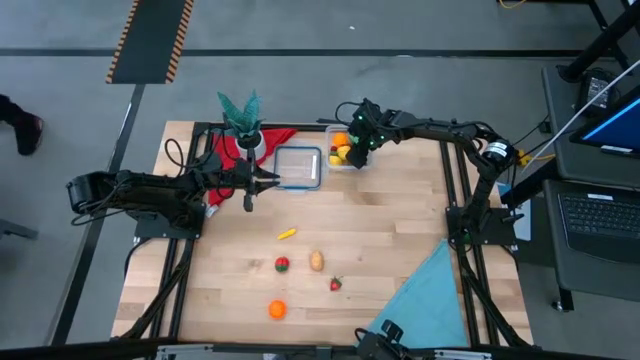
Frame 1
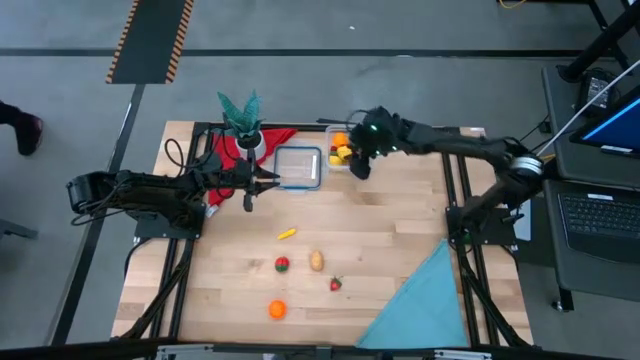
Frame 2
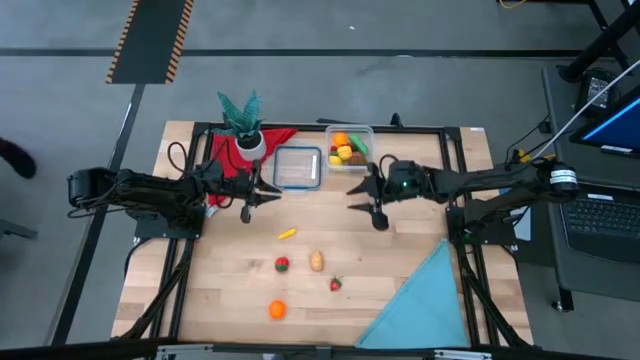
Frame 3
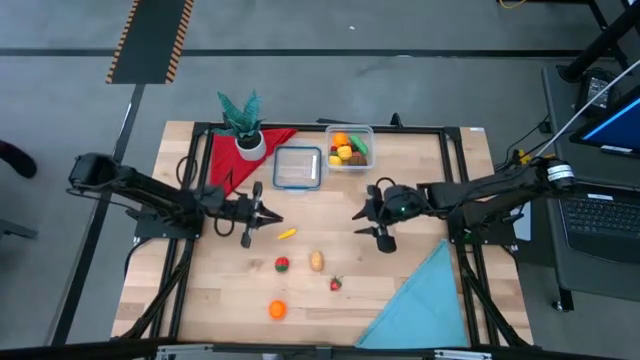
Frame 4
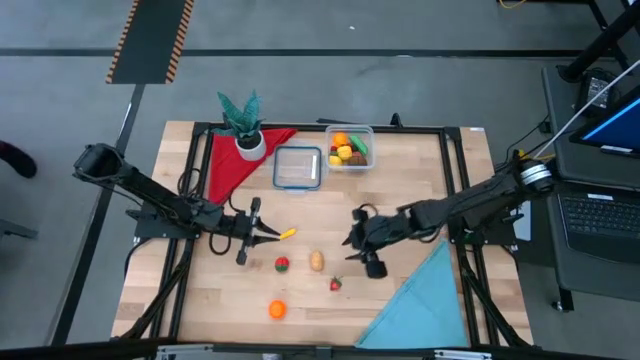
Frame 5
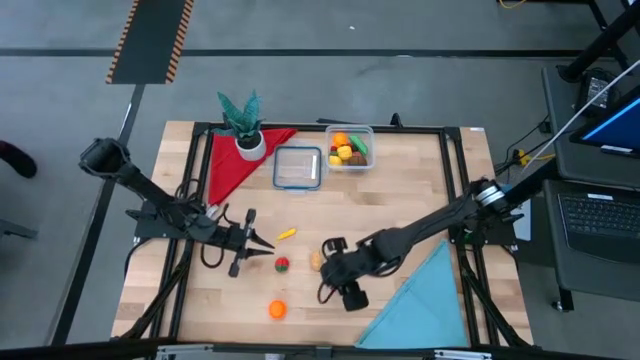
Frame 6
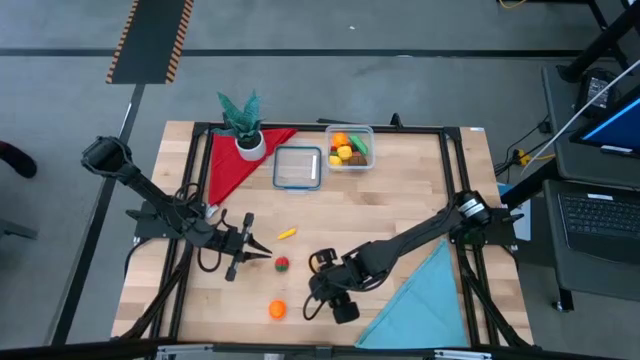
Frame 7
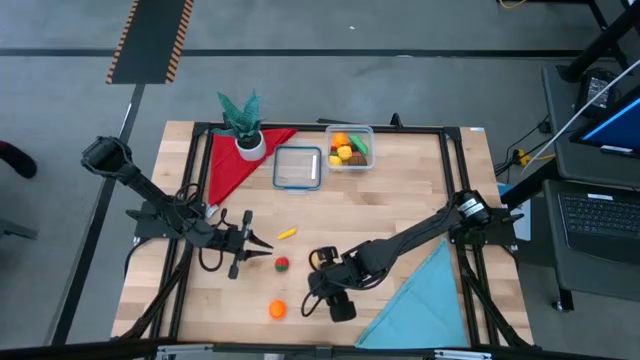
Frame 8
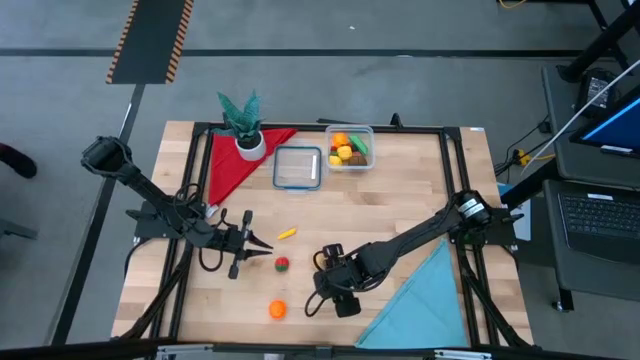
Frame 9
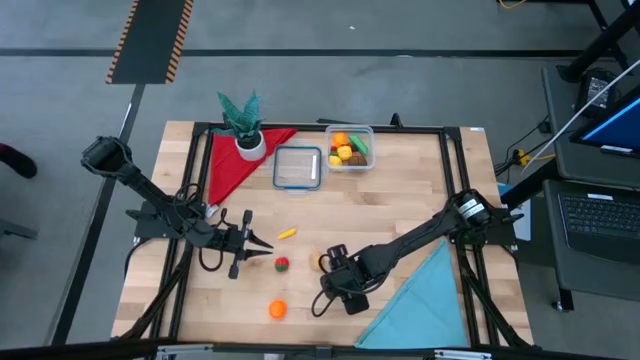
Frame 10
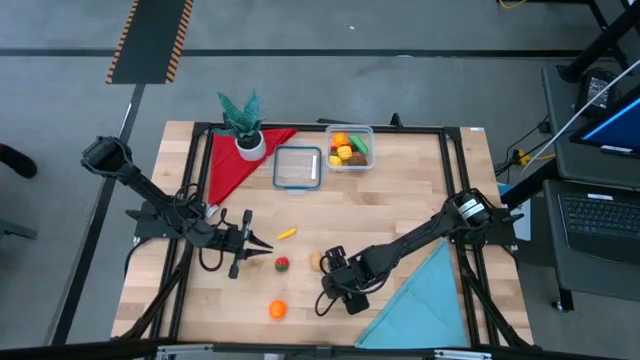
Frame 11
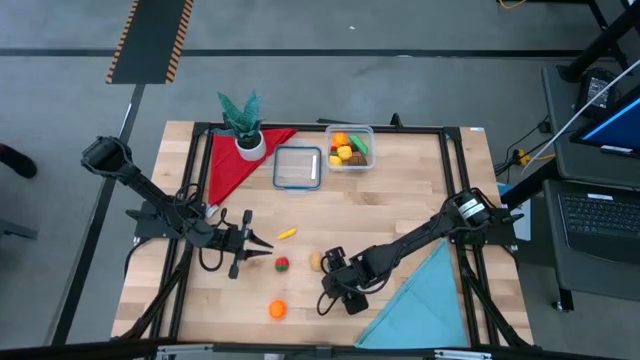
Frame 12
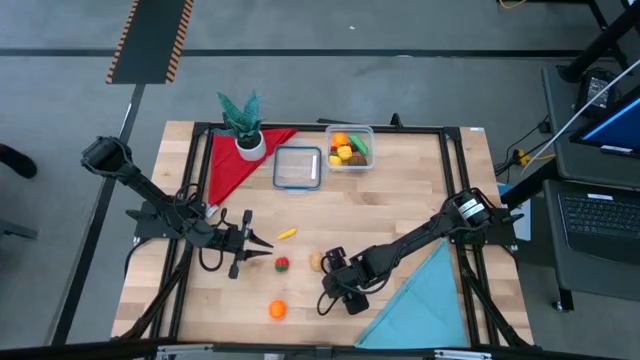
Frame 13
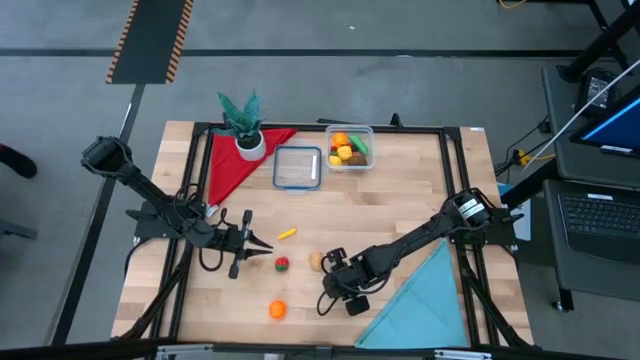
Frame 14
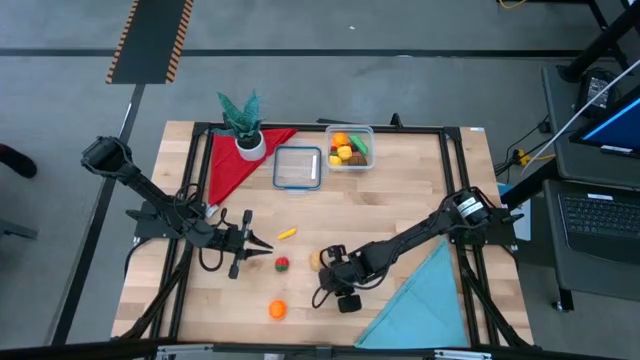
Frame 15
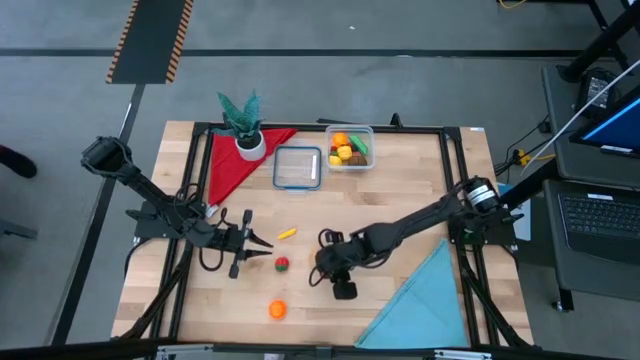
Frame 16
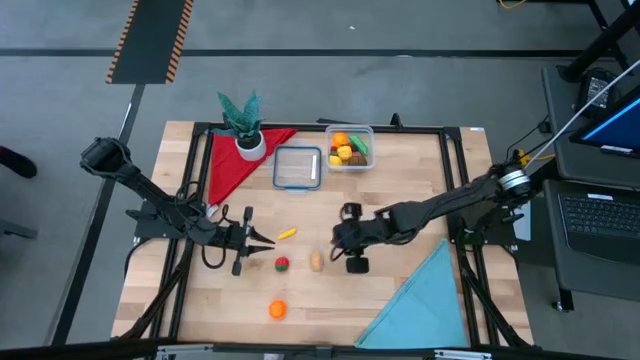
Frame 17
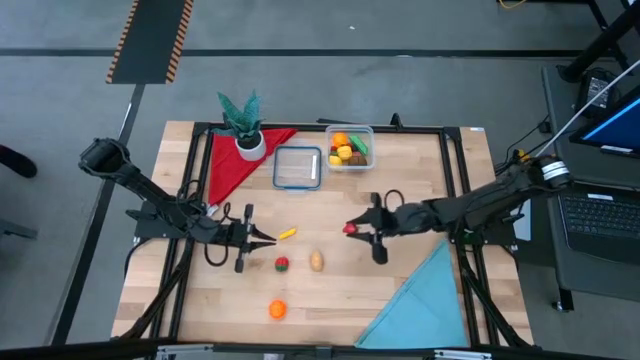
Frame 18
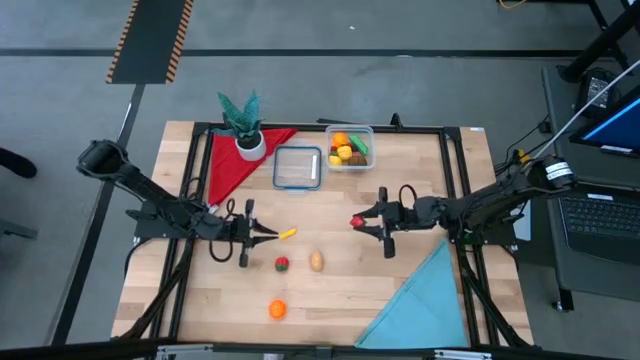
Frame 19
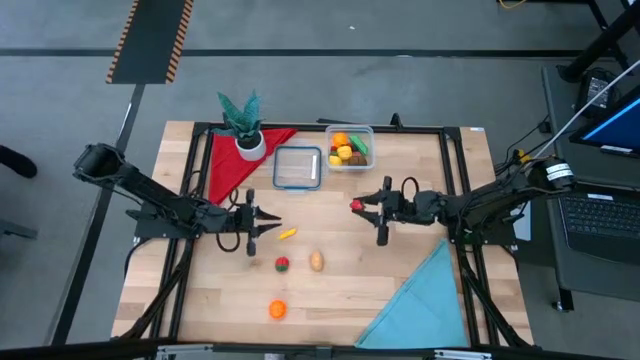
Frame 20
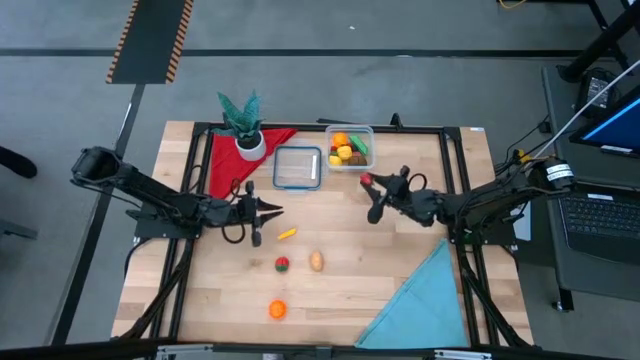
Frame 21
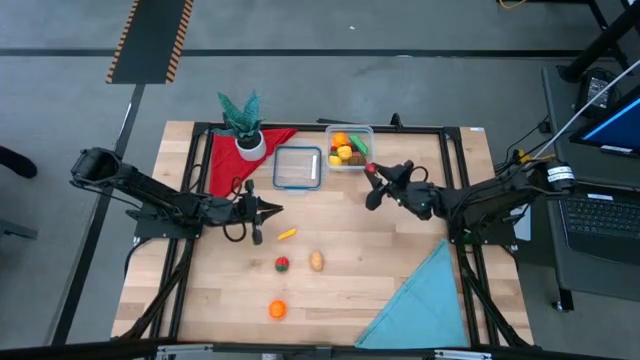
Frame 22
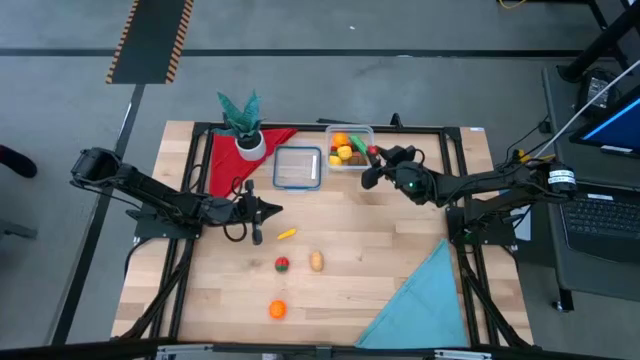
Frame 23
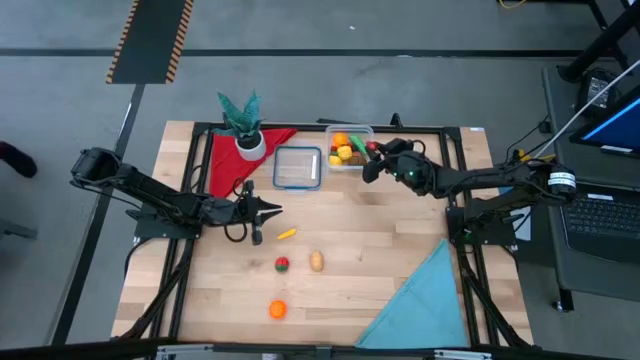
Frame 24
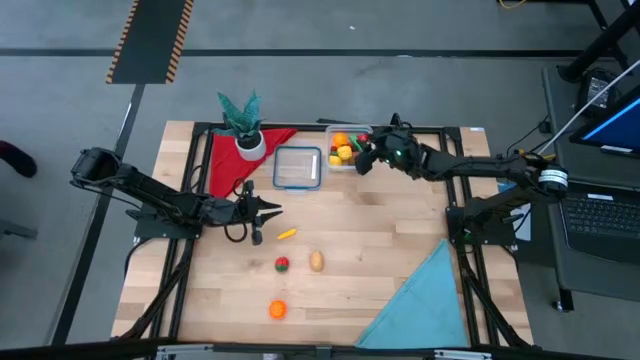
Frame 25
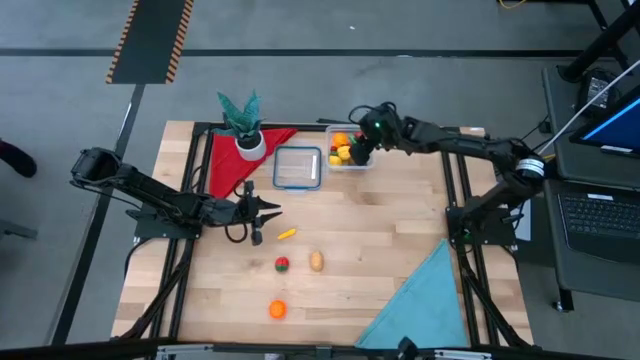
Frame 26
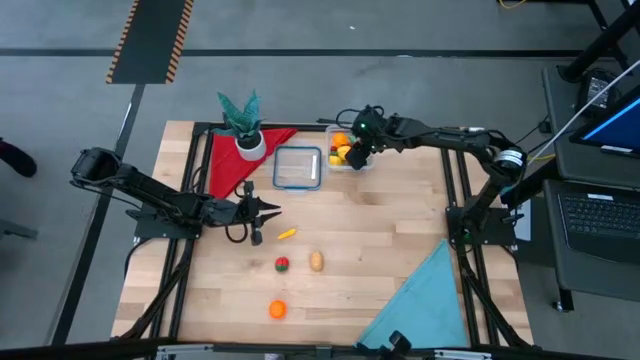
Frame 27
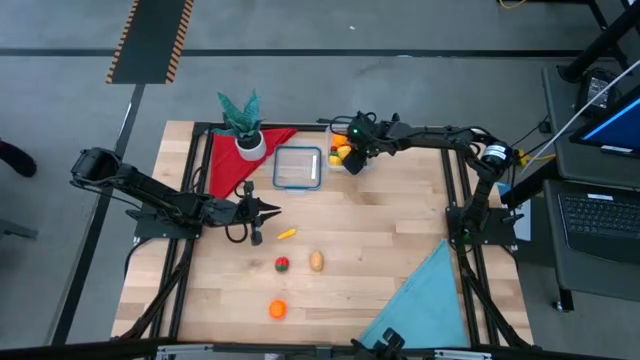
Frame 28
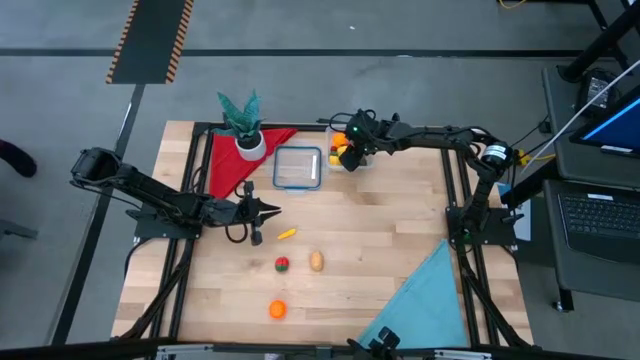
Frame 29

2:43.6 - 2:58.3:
Task: Pick and placing Produce into tupperware
Put the right strawberry into the transparent bin

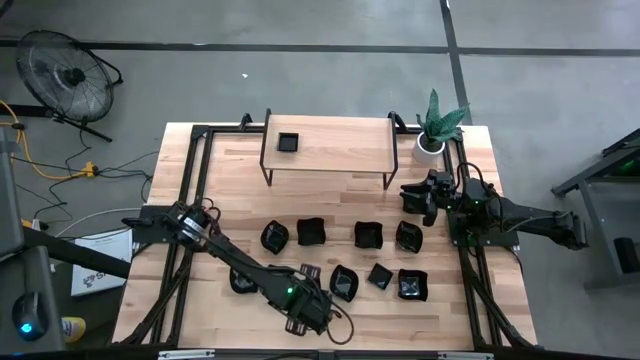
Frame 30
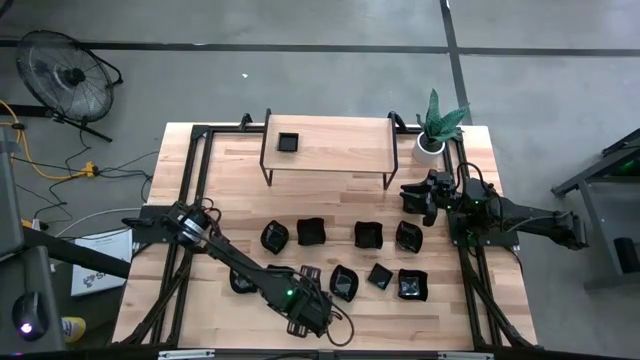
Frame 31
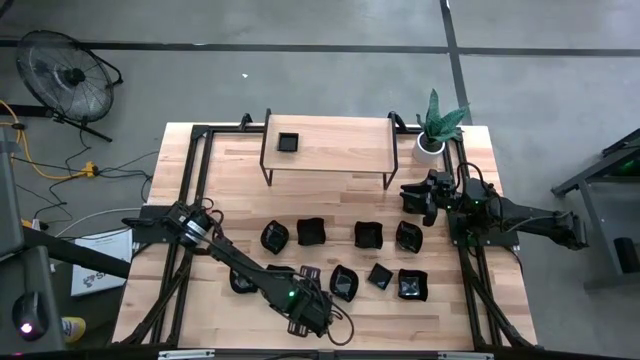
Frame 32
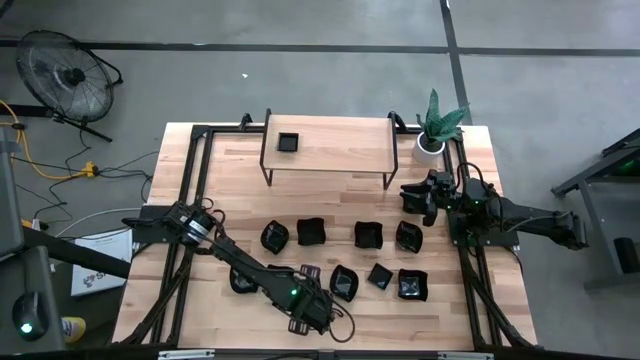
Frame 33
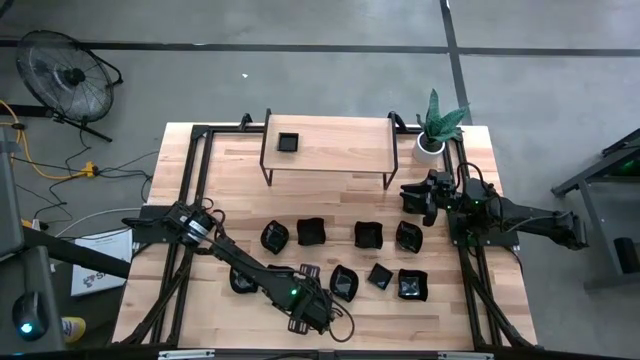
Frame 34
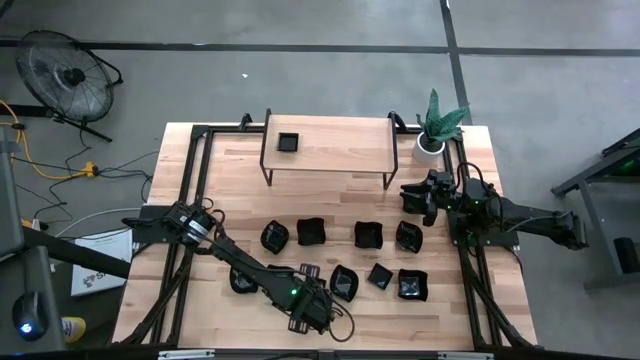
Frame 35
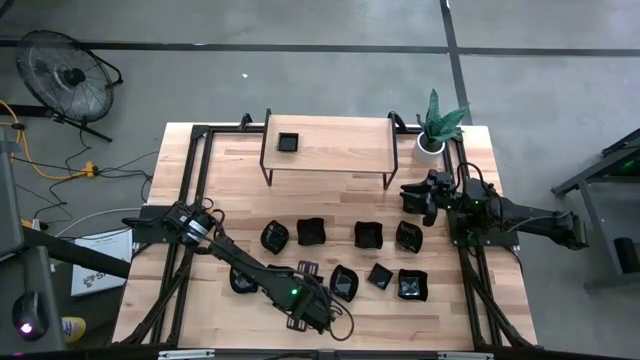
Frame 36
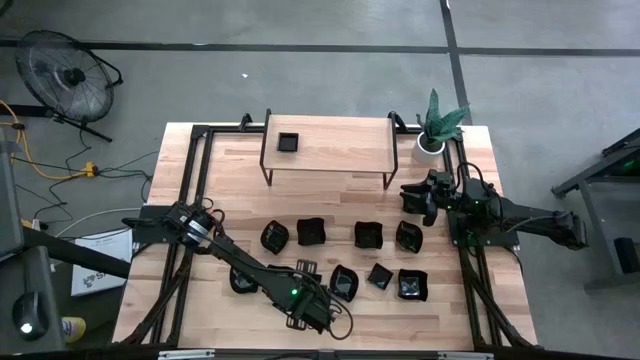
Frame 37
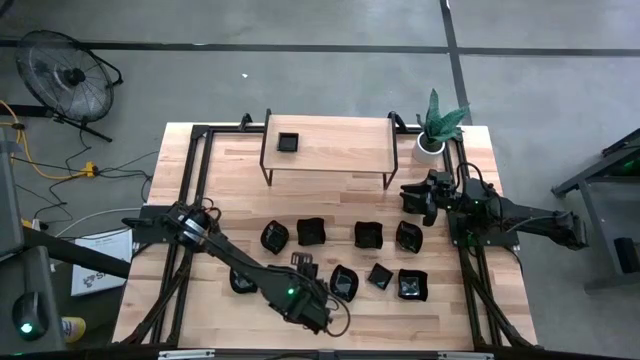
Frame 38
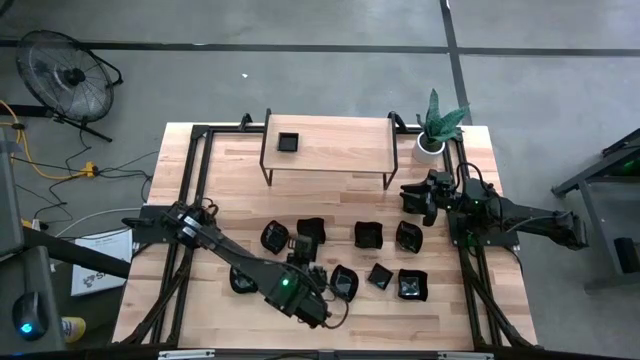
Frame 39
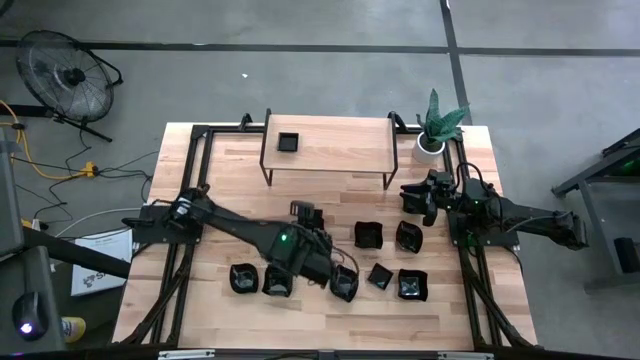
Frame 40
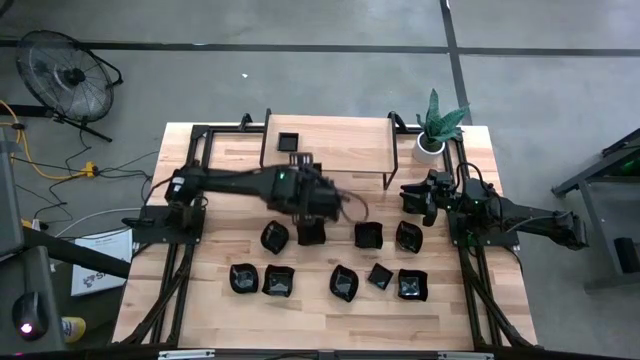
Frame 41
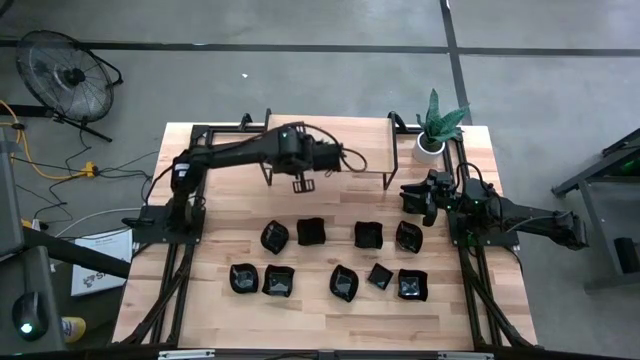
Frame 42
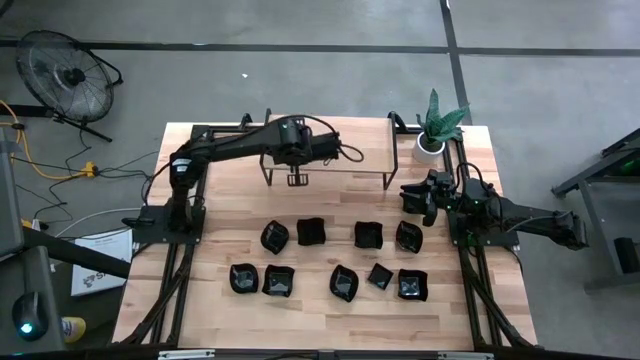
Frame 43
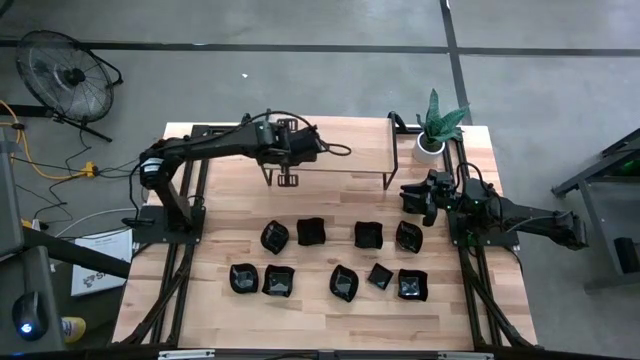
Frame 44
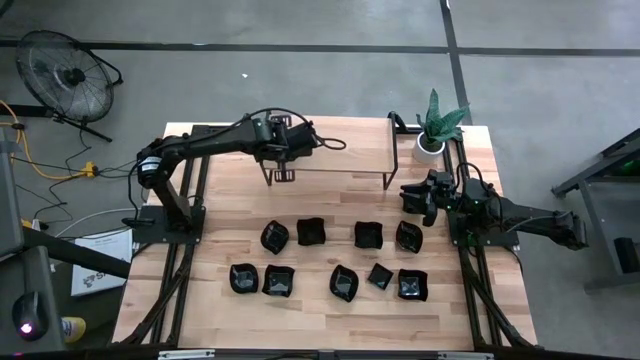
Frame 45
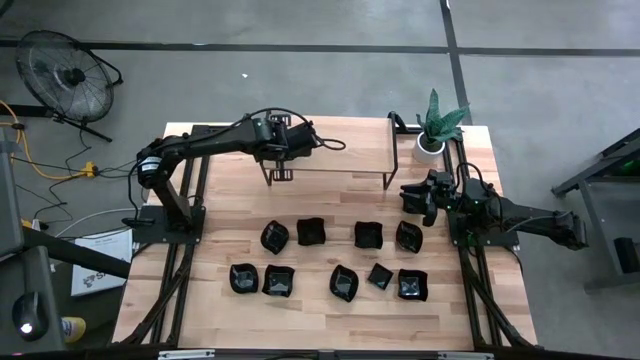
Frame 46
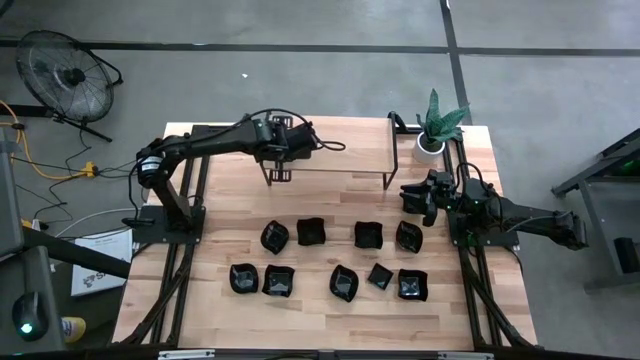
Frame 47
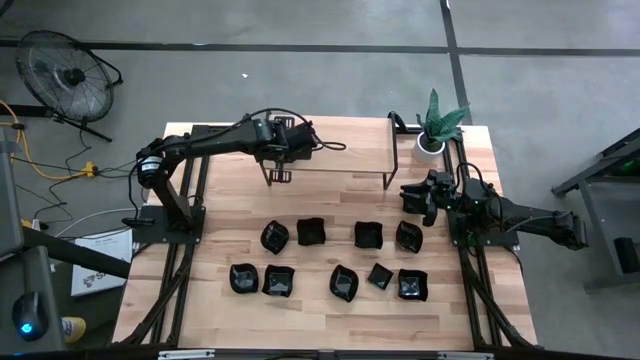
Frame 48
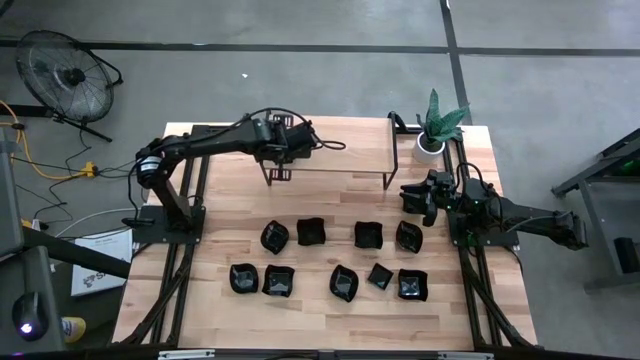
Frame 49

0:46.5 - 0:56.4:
Task: Pick & Place Mini shaped plates
Stack the black square plate on top of the stacked black square plates on the shelf
